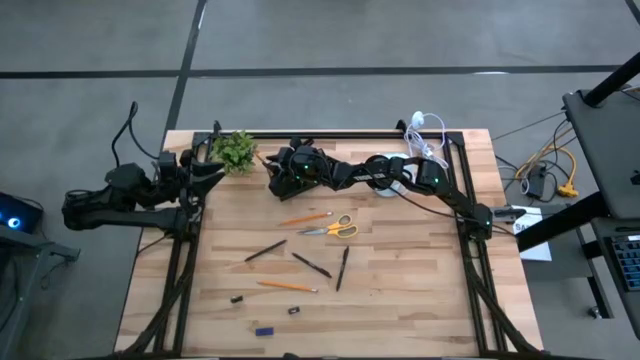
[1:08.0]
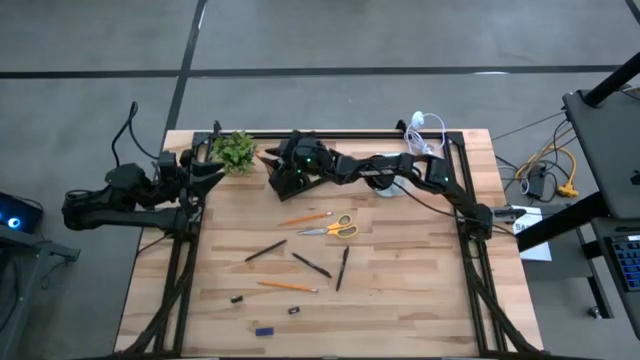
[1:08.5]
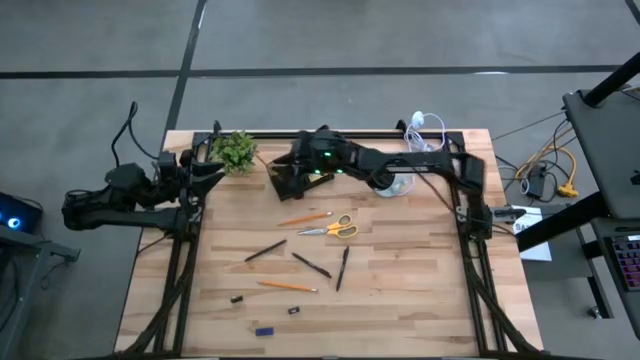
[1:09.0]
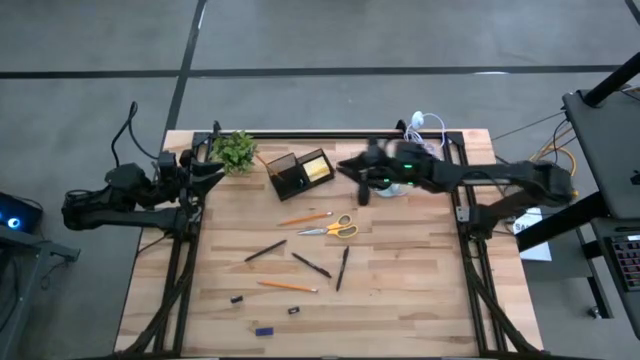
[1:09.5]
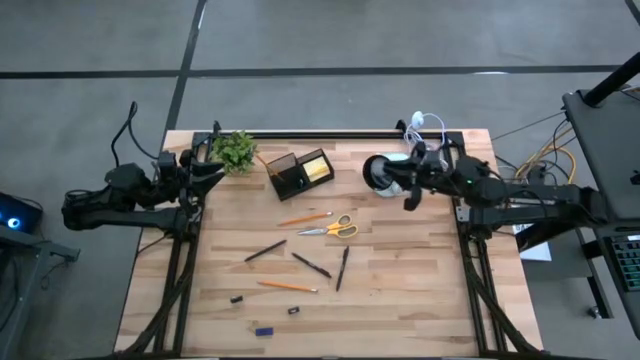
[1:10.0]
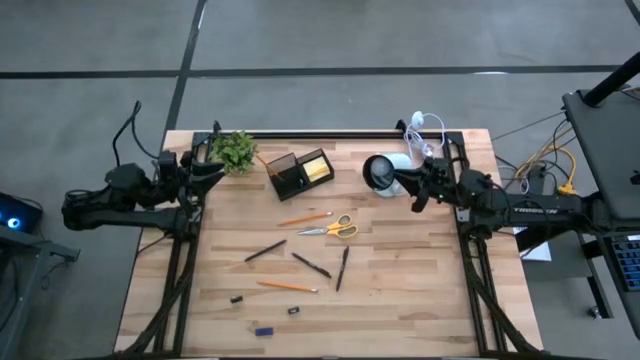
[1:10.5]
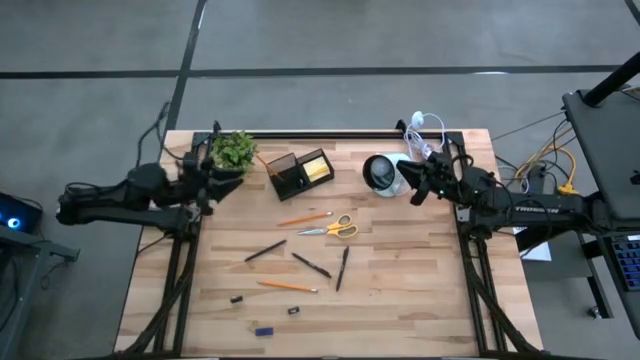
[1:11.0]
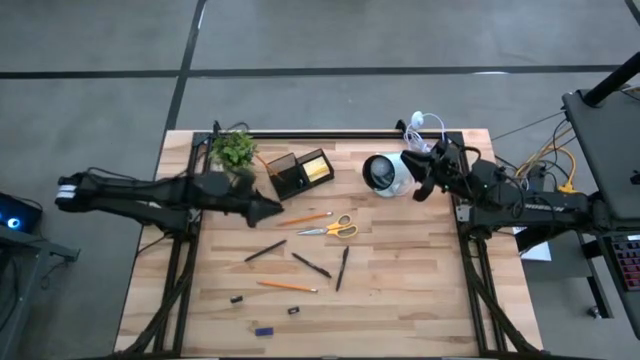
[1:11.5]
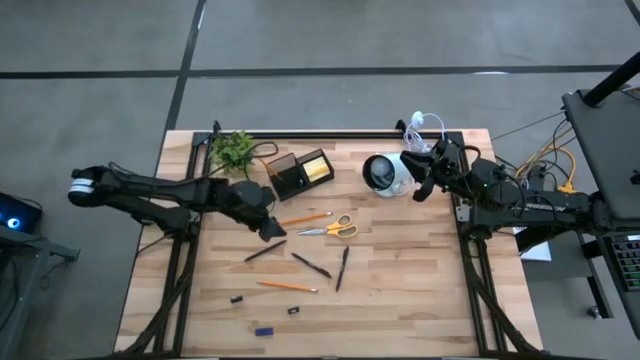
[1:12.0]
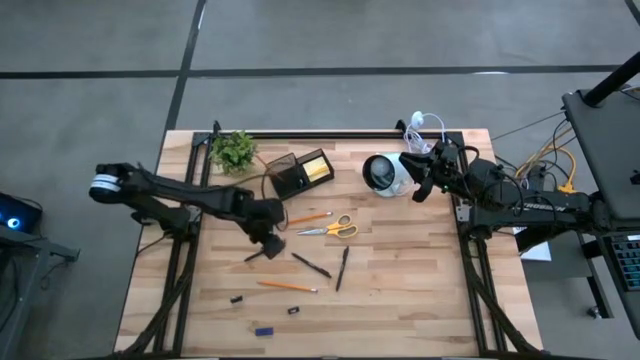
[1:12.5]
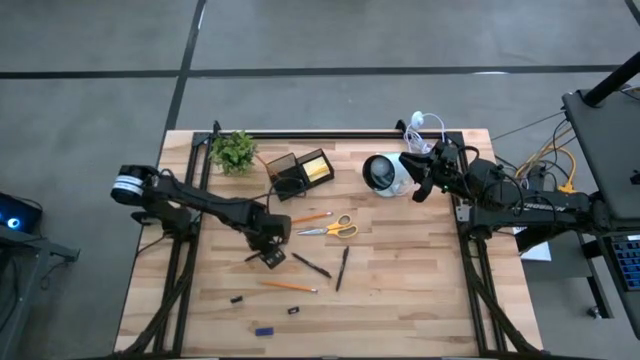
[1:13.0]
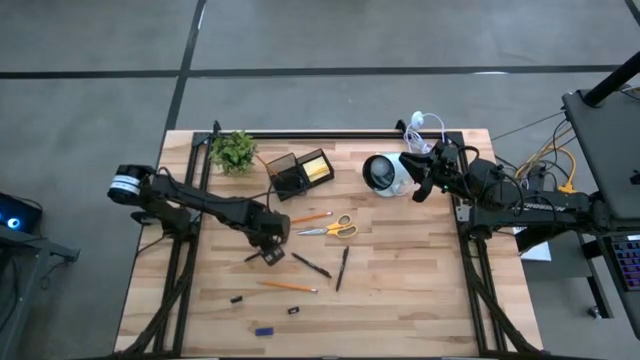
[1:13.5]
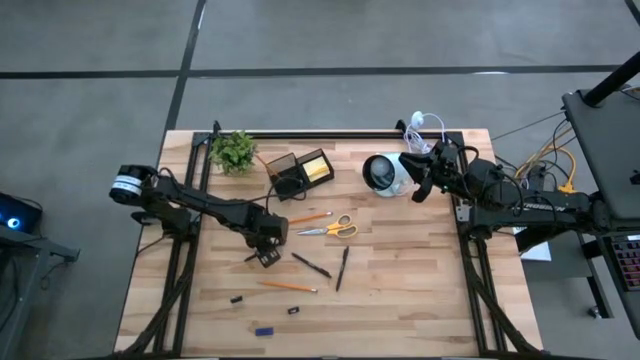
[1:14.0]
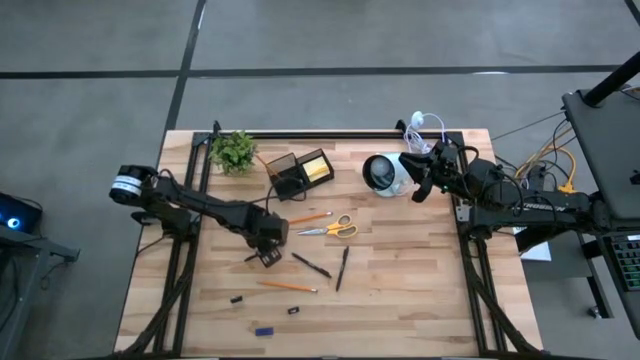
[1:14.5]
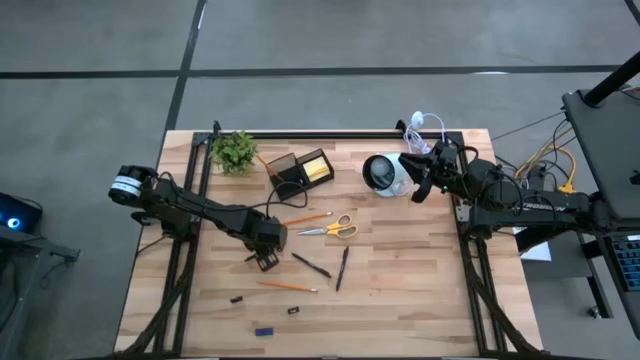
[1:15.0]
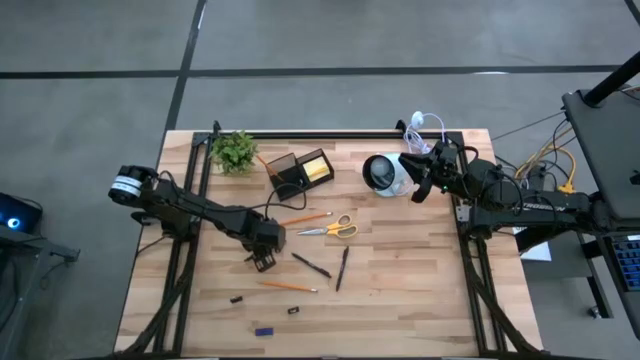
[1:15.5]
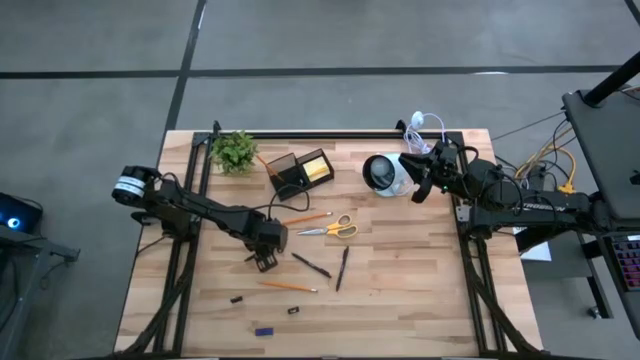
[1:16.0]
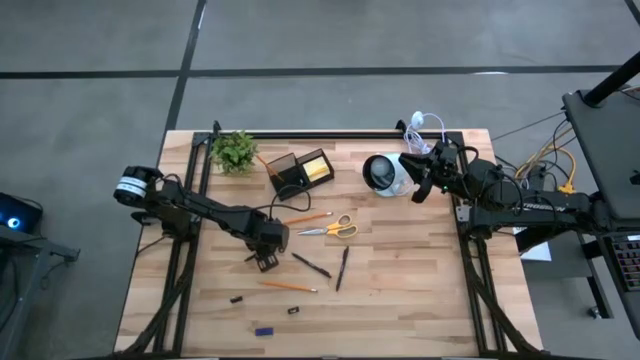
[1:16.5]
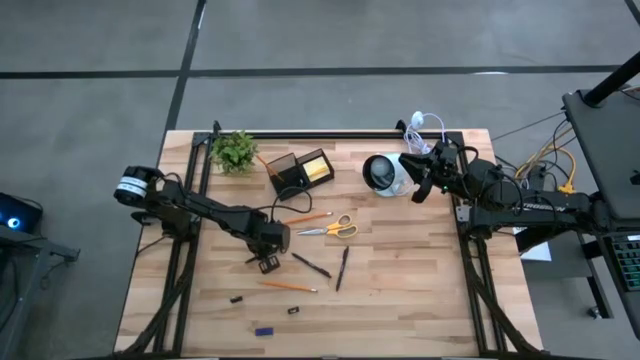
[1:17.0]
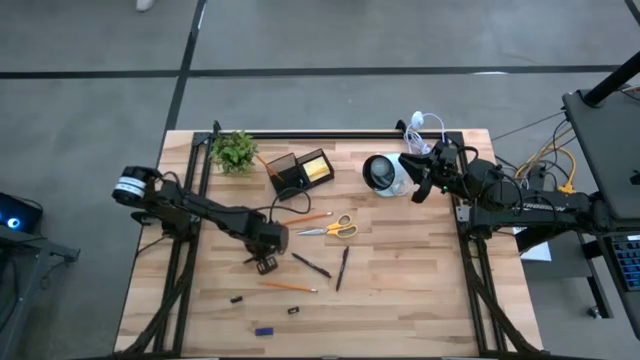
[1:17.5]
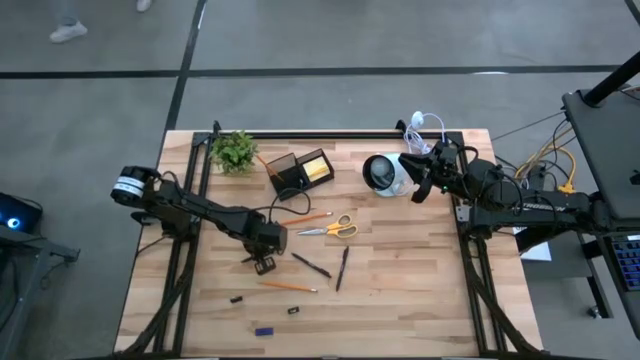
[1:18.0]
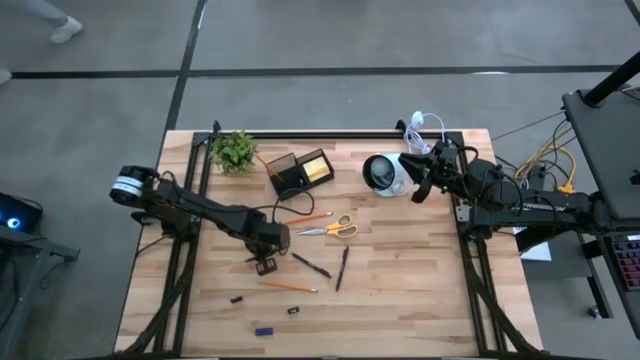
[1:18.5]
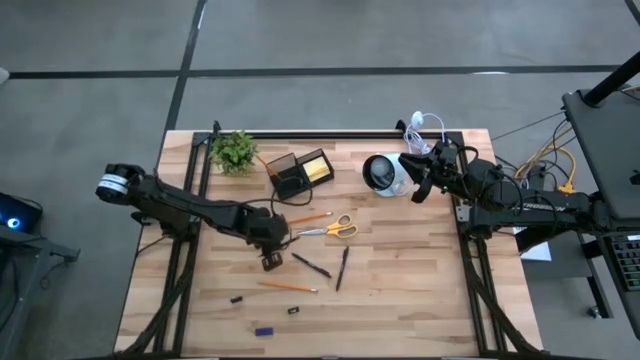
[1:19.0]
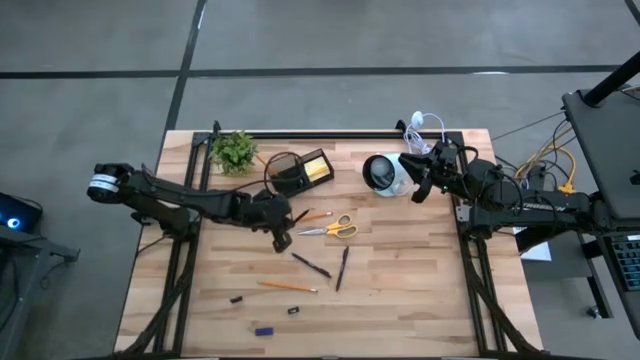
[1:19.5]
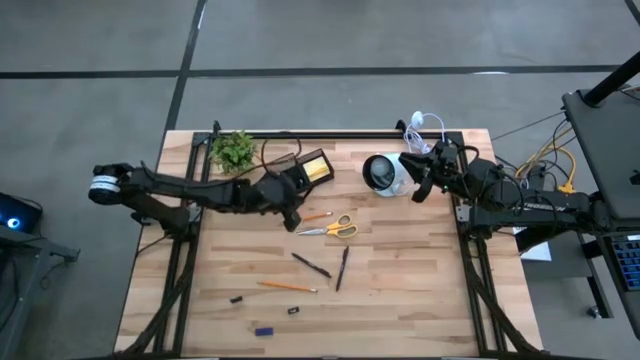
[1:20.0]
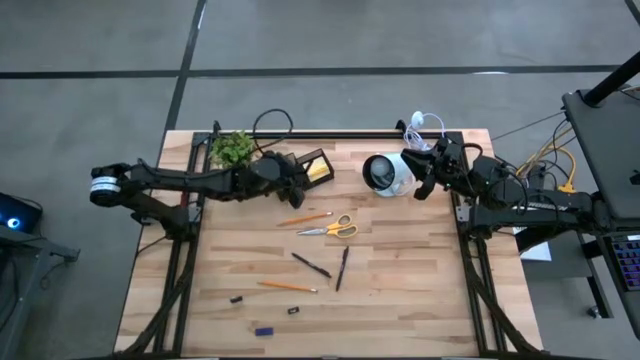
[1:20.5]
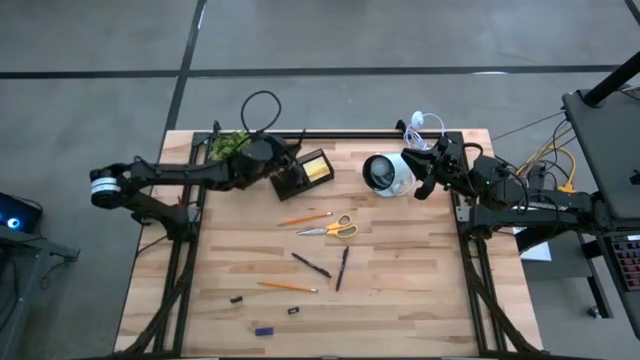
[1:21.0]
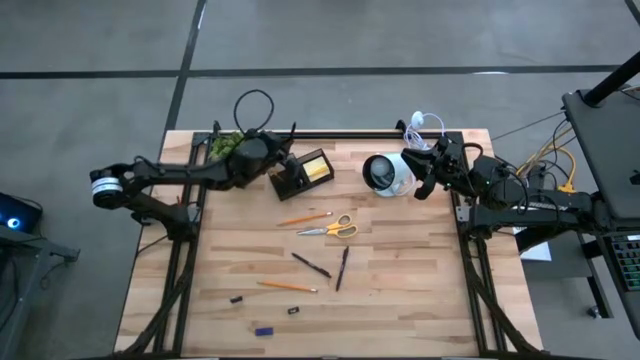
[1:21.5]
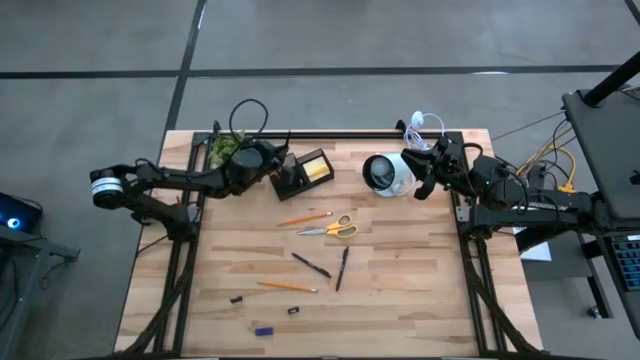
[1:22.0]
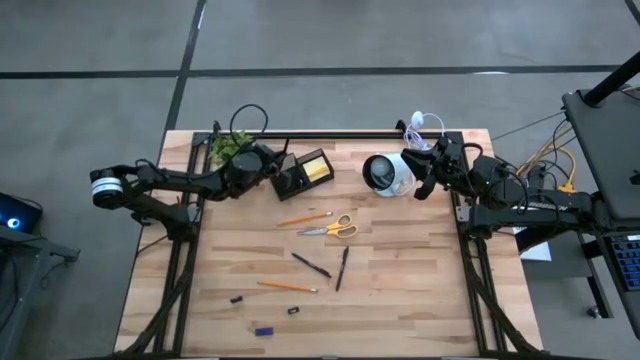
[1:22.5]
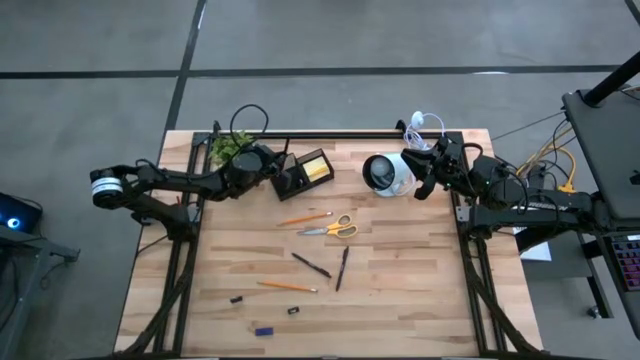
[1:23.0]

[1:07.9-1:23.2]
Task: Pick and place office supplies into organizer
Put the left black pen into the black desk organizer

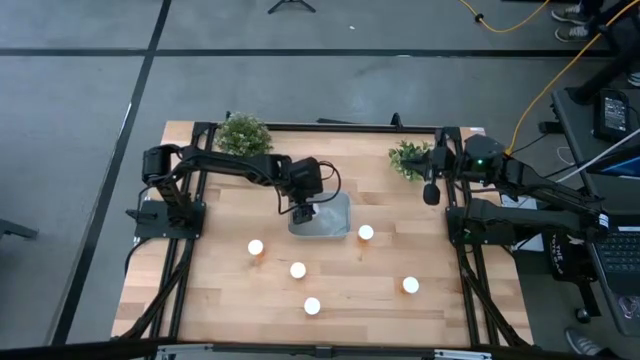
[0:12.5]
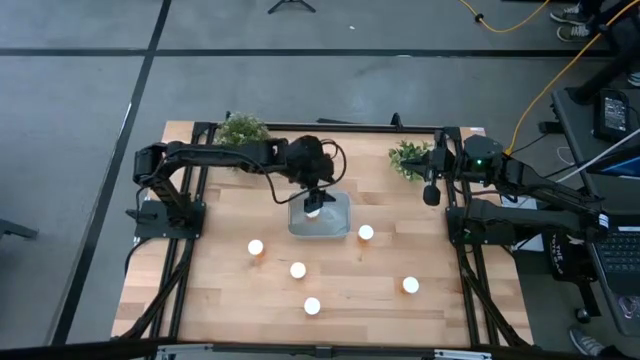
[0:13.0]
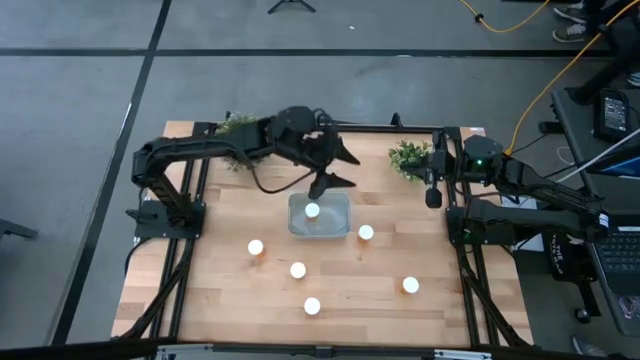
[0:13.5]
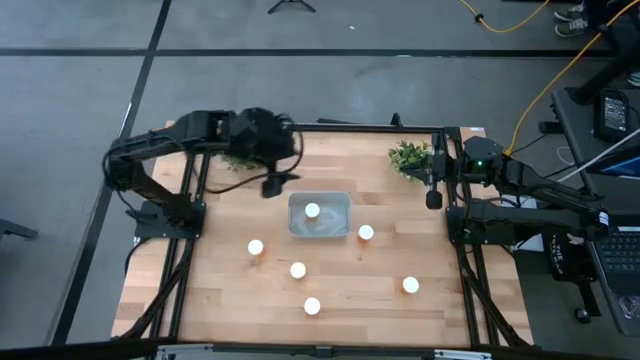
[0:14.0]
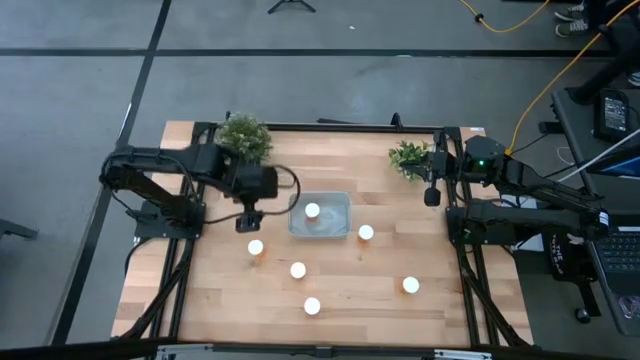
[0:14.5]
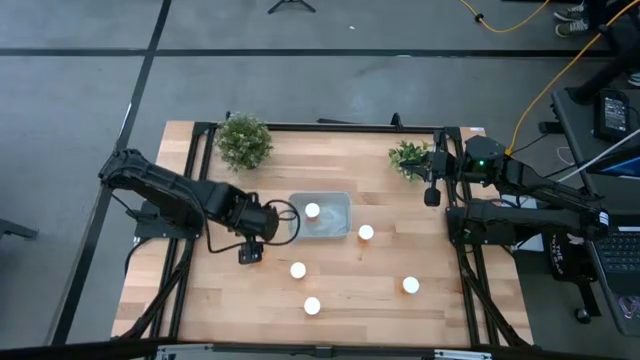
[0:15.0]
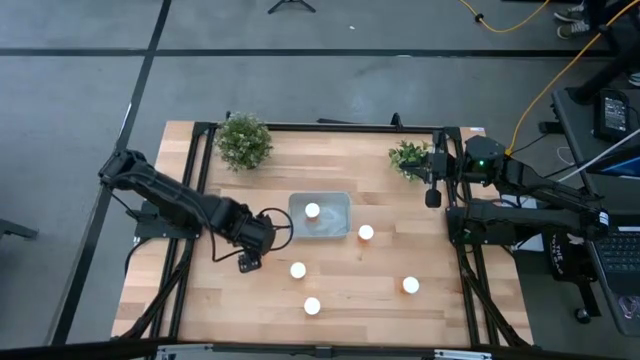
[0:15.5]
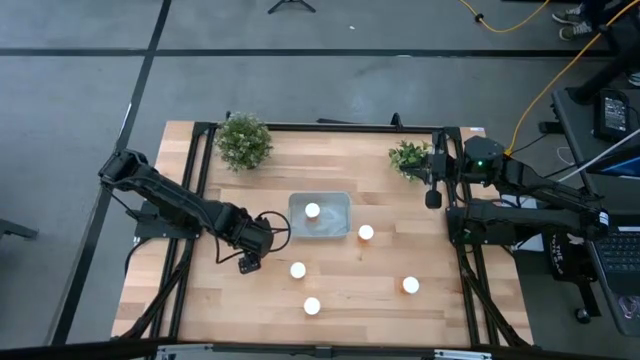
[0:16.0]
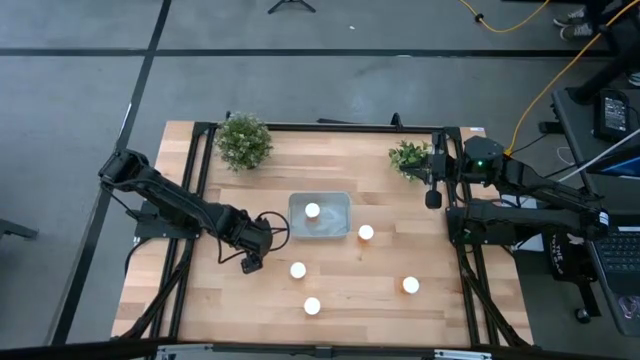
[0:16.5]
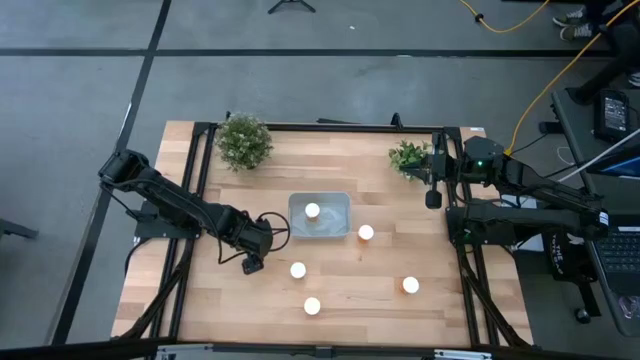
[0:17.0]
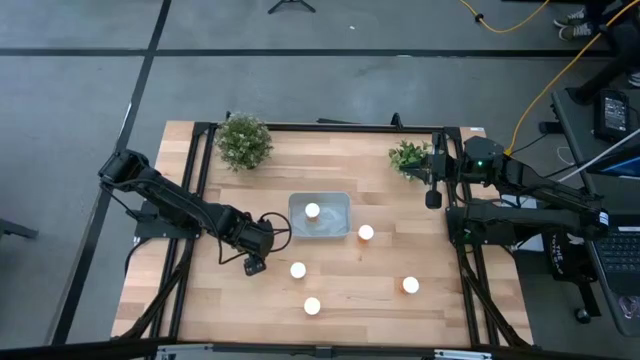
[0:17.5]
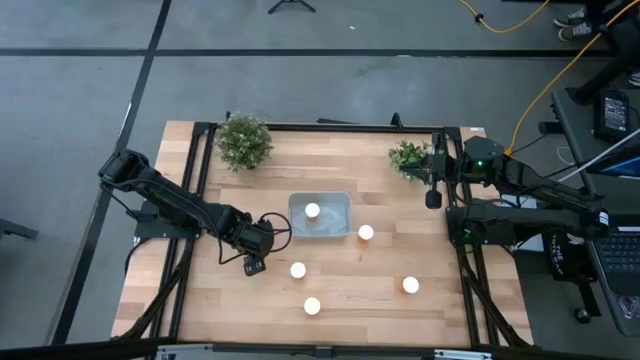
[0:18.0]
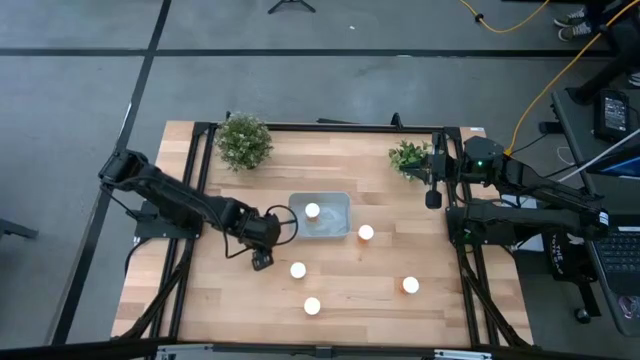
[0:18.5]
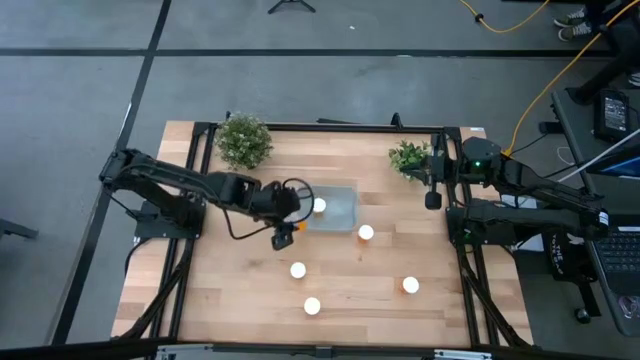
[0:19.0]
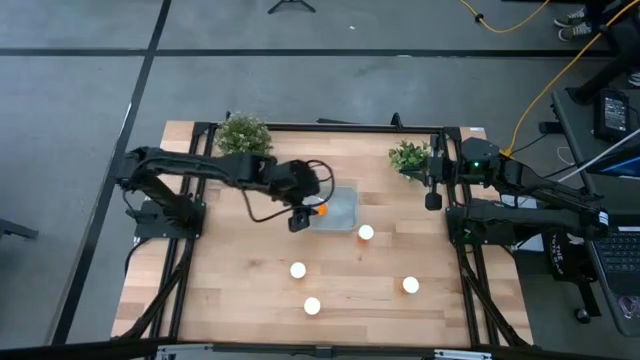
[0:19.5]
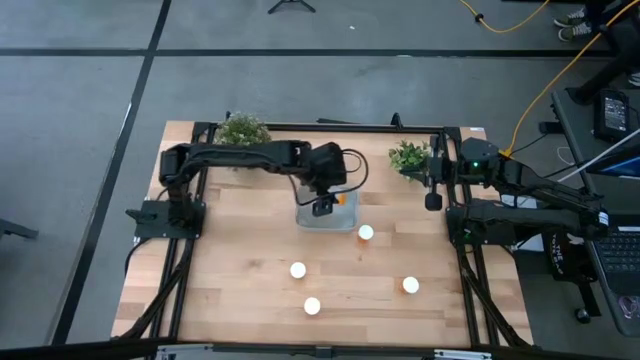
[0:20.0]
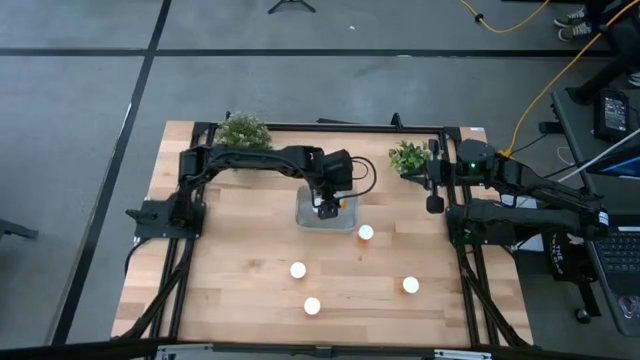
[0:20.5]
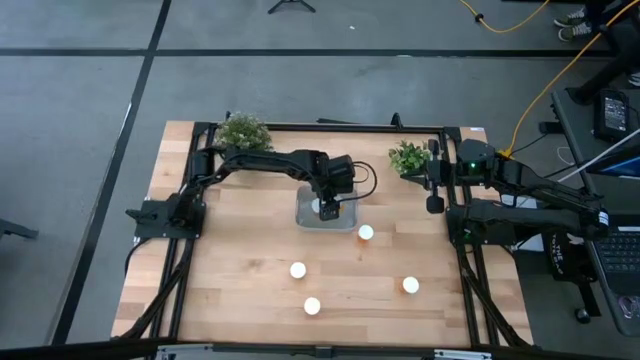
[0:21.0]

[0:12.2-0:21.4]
Task: Pick and place pill bottles into a basket
Put the orange pill bottle into the gray bin
